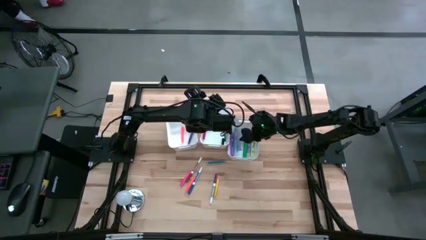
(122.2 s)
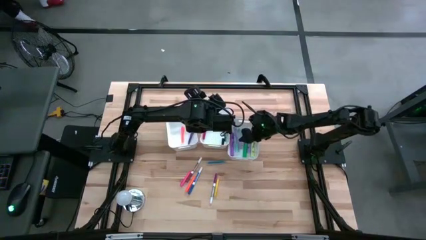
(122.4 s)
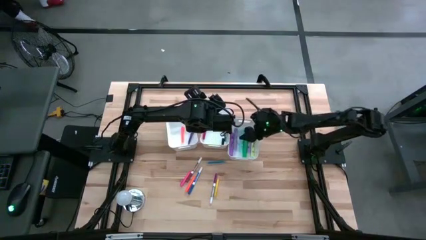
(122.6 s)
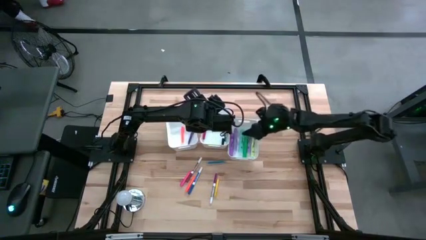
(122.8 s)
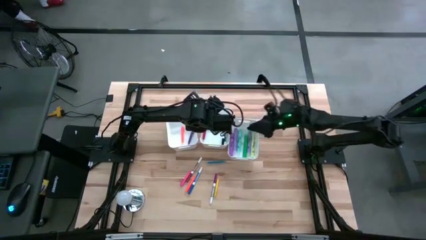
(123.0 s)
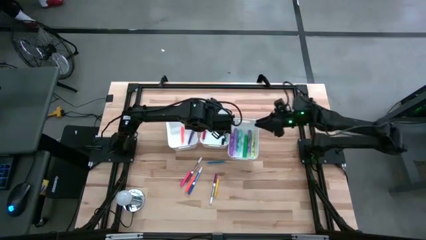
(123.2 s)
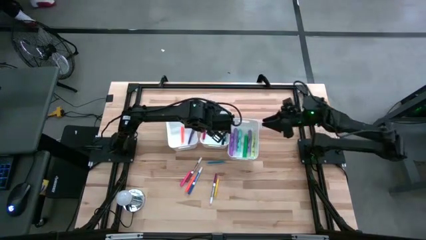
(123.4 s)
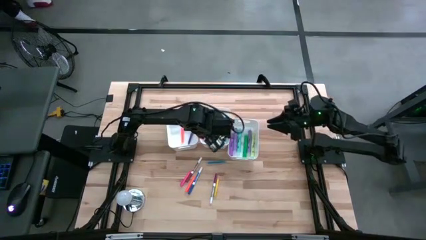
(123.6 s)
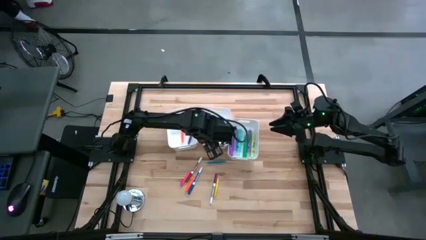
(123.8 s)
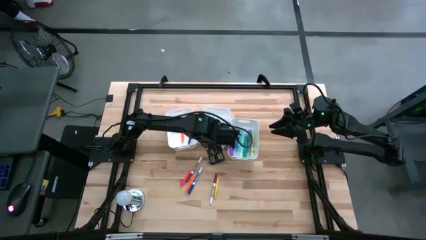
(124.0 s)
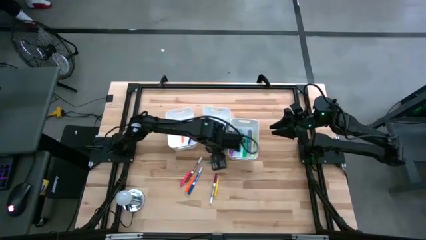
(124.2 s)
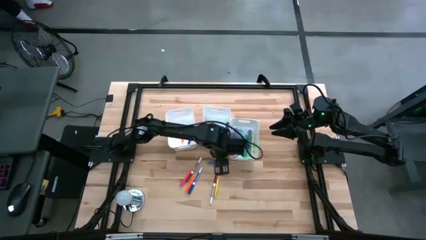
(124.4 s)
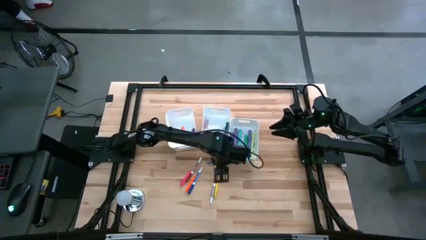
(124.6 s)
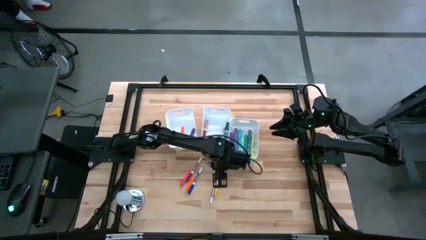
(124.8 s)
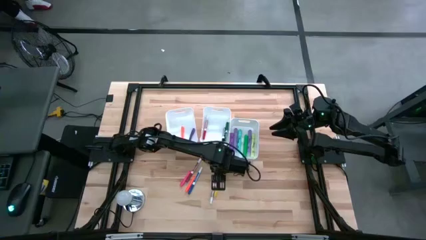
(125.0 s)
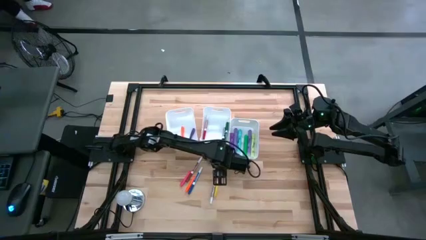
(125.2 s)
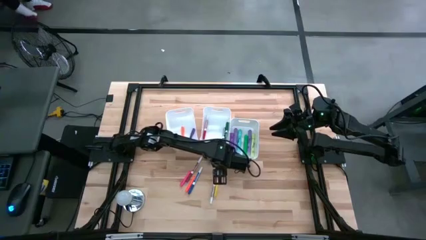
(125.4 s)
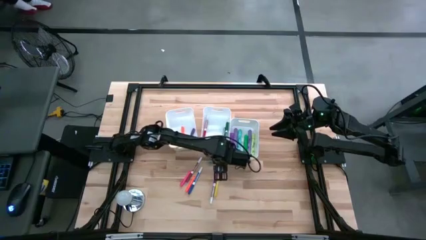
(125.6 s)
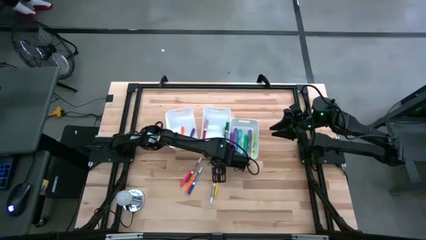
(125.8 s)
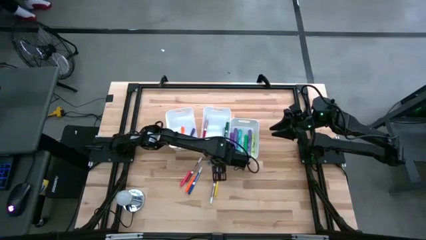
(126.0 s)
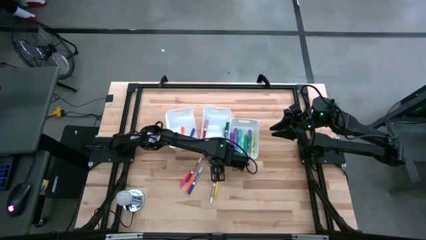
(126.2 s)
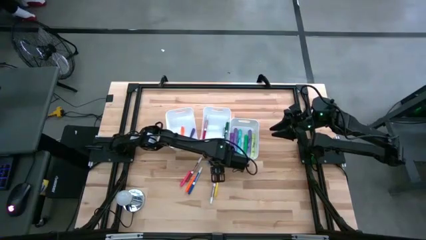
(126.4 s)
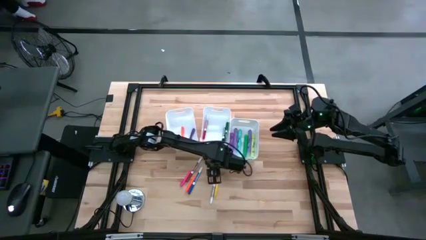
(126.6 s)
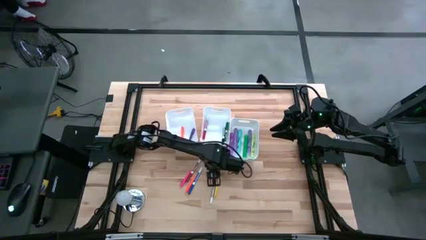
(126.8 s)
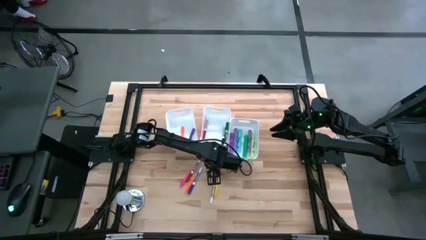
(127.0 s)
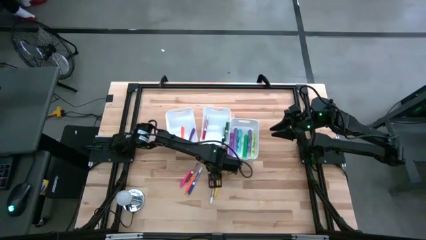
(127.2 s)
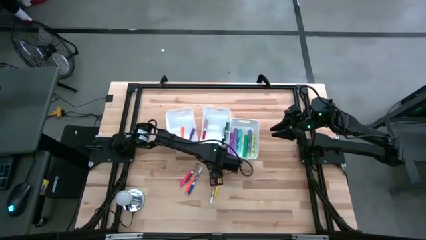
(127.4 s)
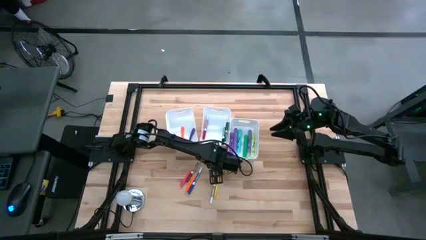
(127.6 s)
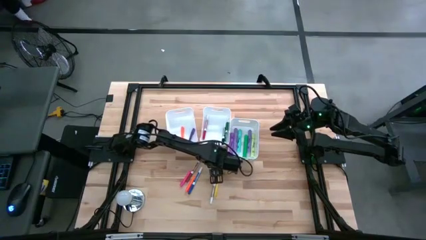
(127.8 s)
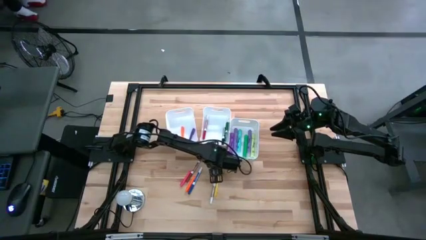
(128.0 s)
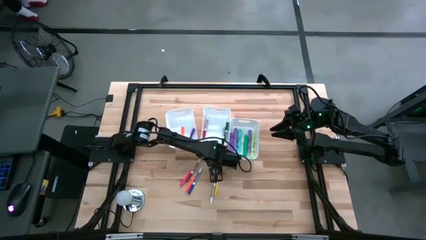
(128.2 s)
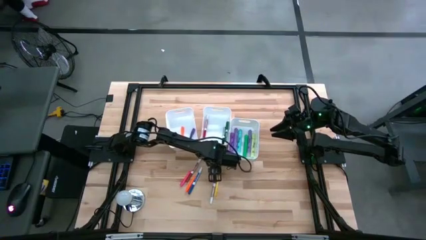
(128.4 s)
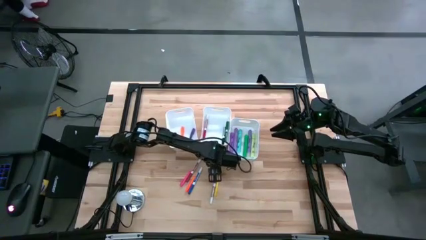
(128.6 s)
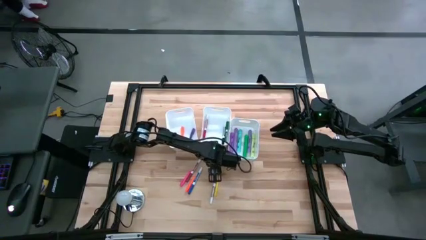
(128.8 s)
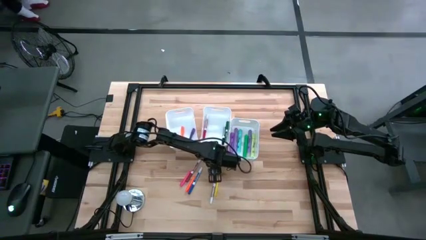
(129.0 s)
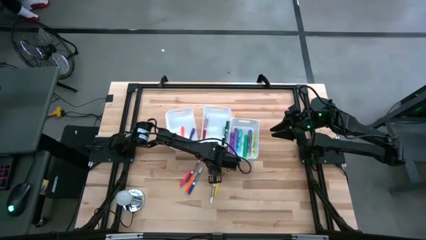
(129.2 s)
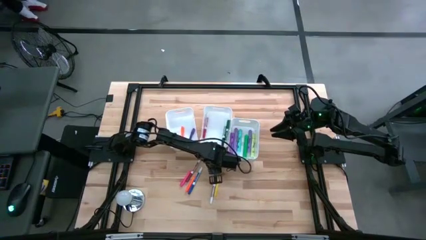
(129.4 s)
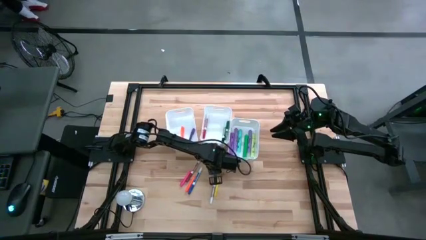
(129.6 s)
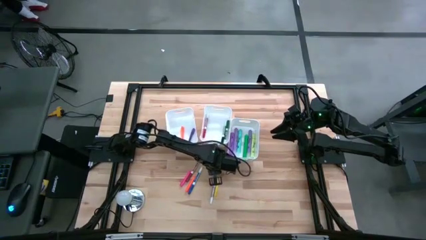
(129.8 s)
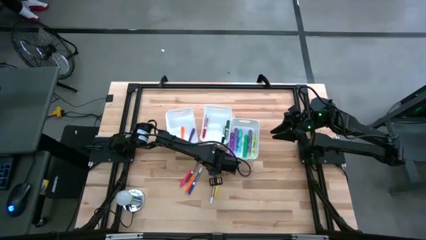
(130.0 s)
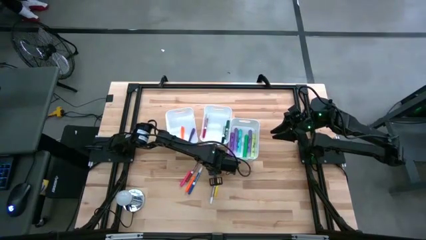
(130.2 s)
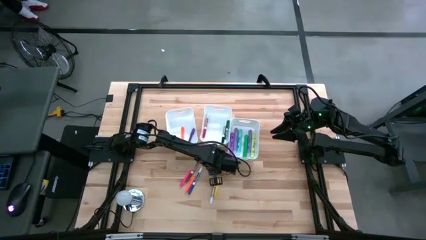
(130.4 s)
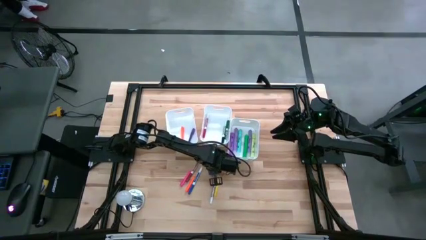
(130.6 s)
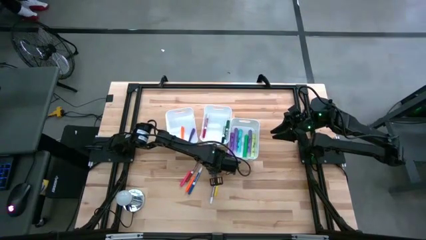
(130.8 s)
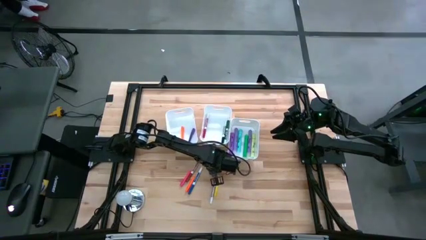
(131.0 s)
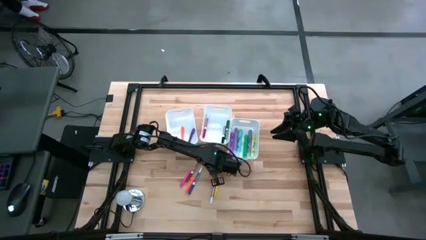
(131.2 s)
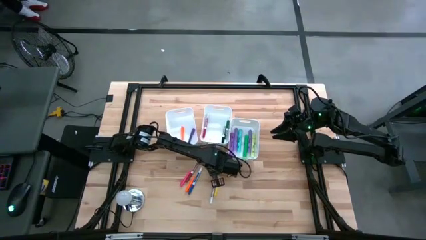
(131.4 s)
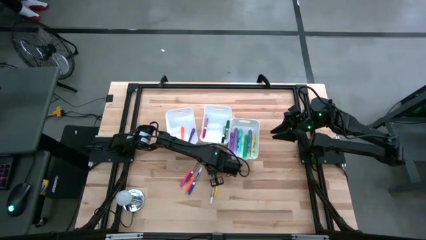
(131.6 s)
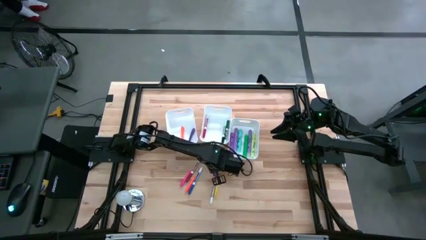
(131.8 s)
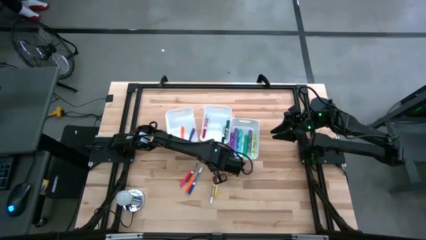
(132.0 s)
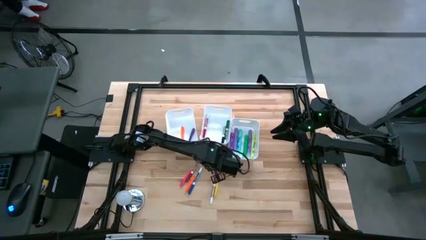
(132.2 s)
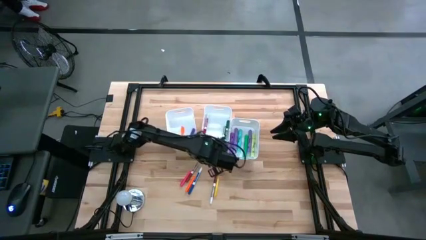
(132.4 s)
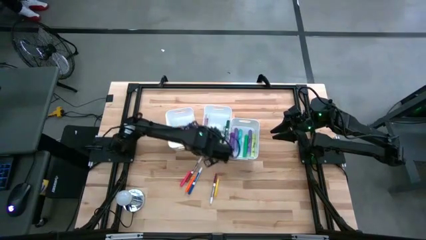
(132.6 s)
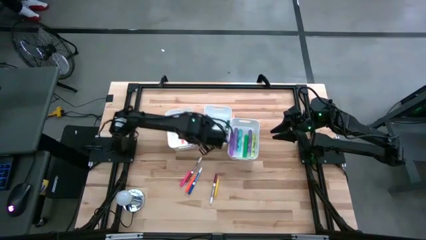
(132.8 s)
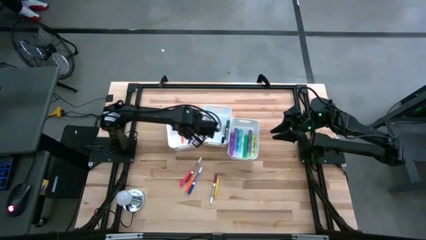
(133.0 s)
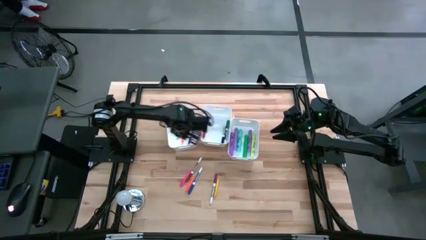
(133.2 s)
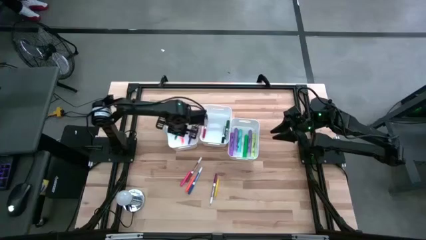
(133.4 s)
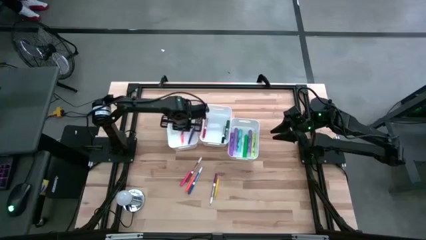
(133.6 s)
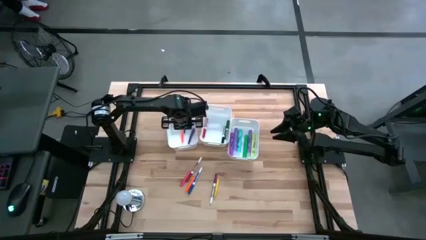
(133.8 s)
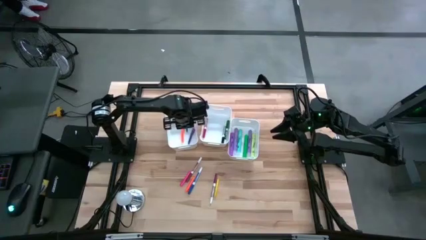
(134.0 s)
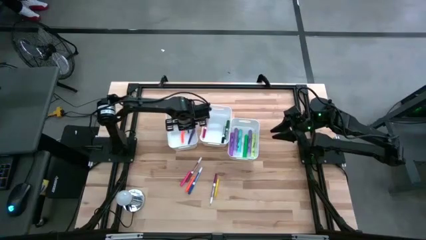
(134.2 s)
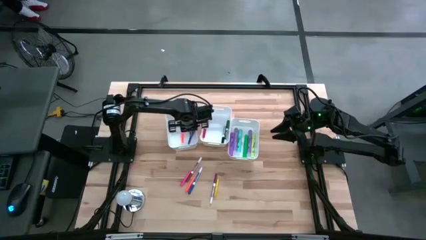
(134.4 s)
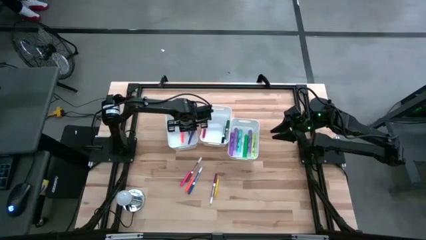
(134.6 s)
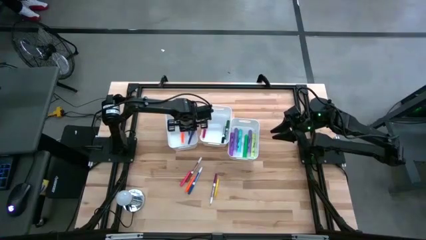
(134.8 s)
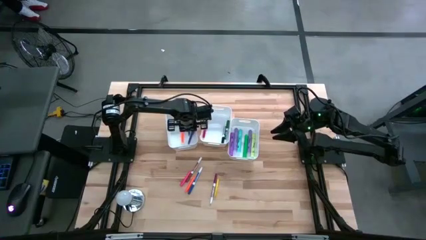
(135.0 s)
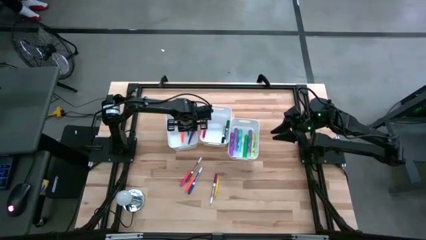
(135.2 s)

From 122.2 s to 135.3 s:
Task: Pick & Place Markers
Put the blue pen into the left white bin

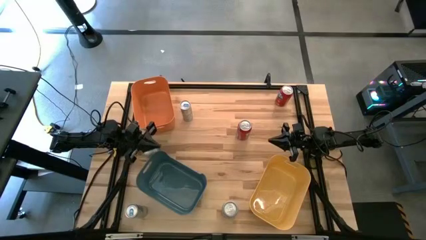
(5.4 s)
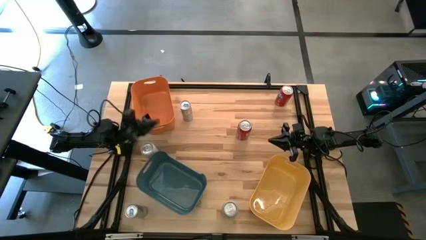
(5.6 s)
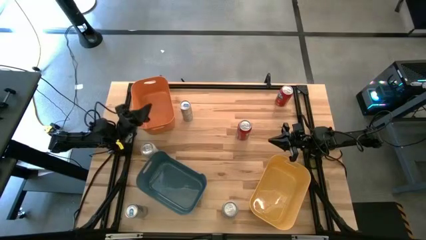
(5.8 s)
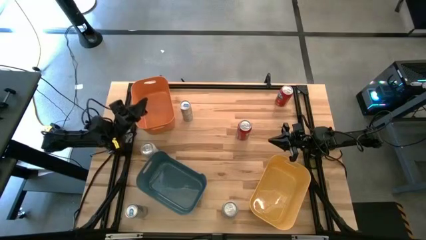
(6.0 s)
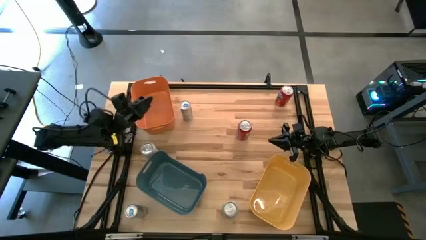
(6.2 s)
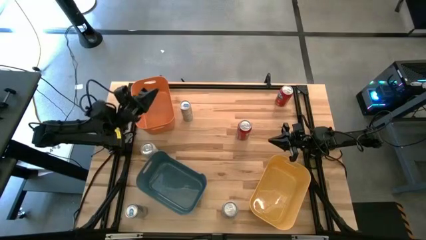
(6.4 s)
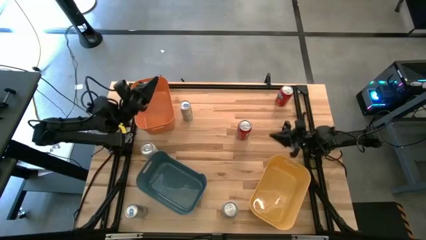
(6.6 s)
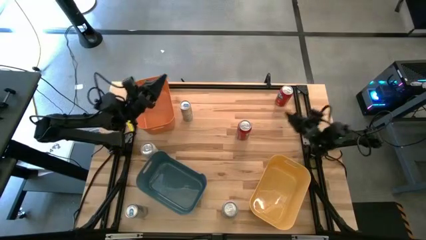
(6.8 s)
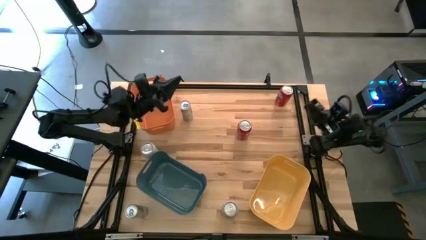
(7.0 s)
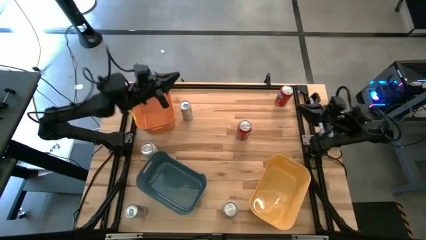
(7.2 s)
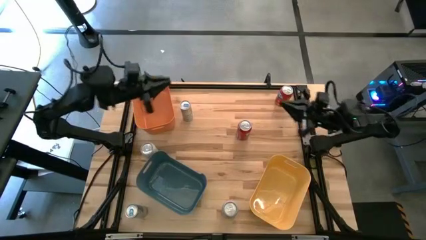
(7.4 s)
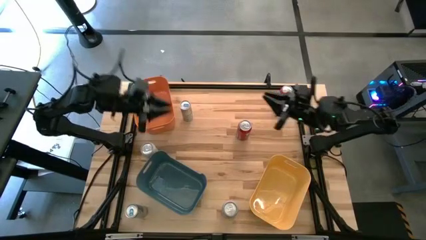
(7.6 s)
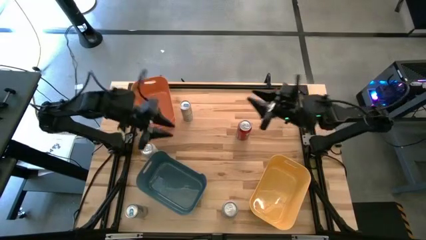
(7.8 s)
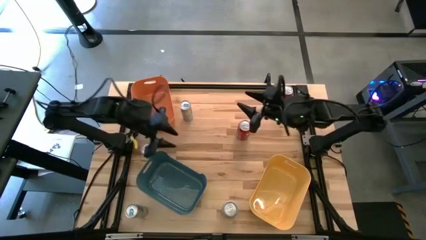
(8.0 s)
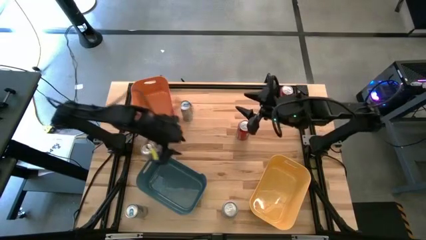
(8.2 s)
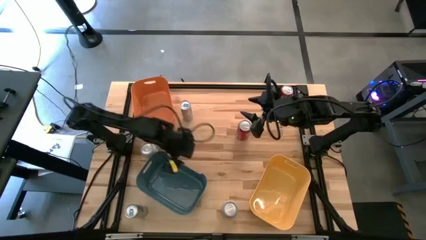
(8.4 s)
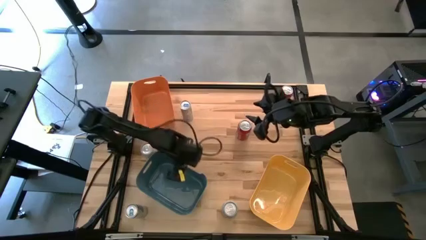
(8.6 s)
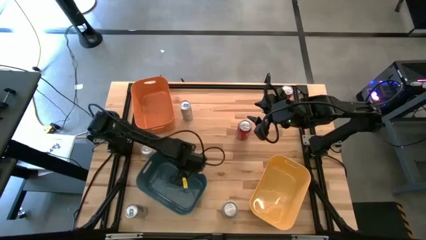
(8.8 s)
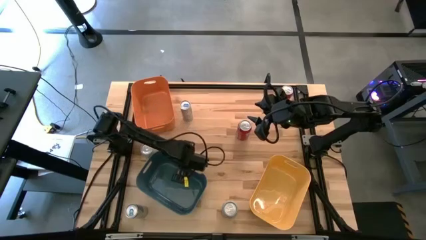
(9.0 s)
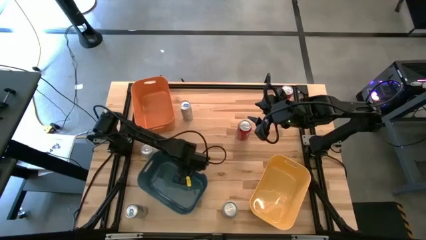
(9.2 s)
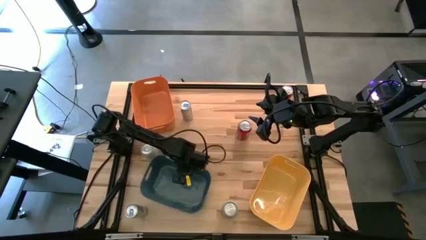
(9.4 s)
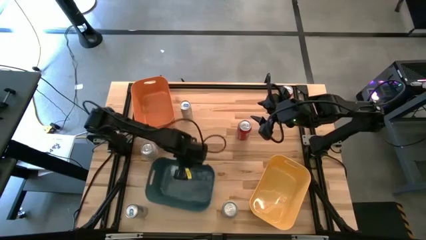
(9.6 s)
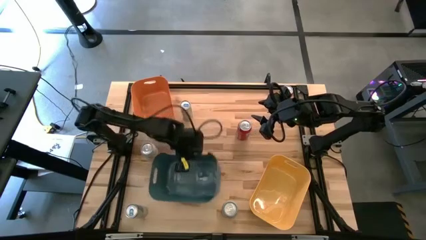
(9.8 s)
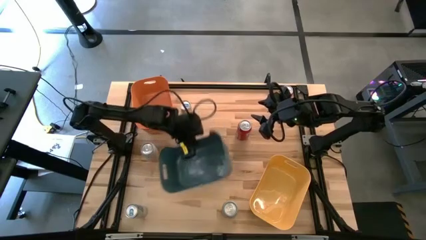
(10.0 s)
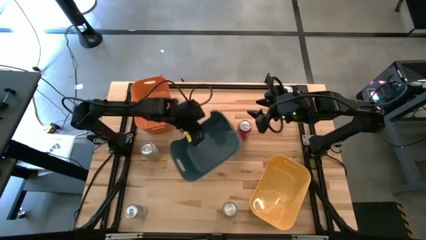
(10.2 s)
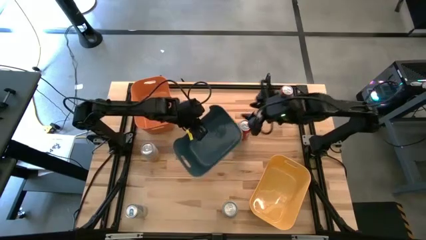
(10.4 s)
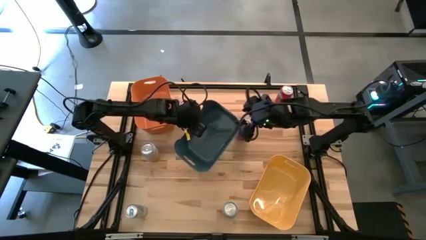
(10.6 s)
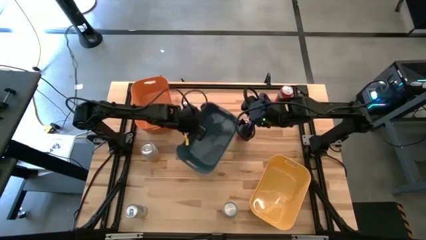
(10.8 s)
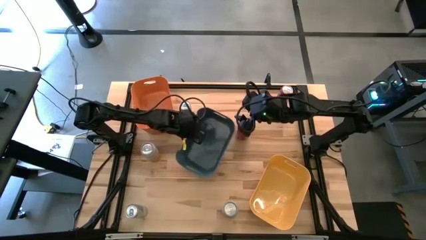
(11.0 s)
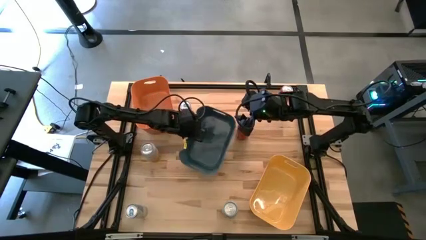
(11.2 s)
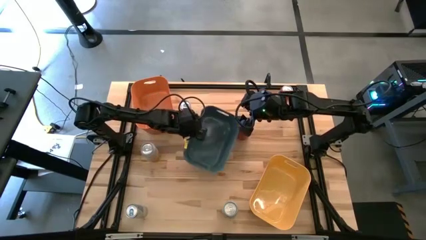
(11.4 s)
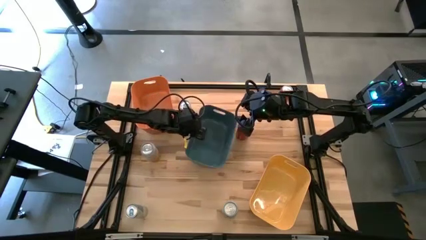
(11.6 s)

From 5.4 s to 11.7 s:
Task: Sort soda cans
Move the blue bin to the center of the table
